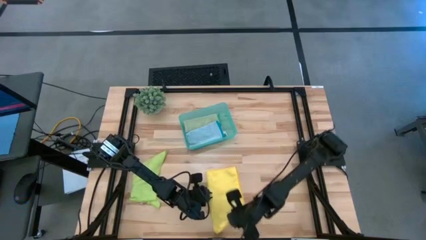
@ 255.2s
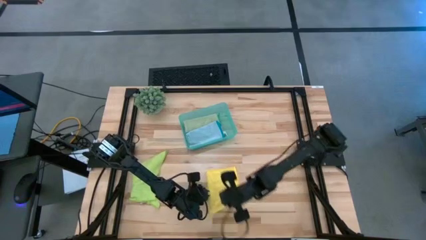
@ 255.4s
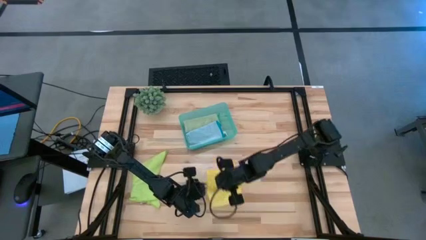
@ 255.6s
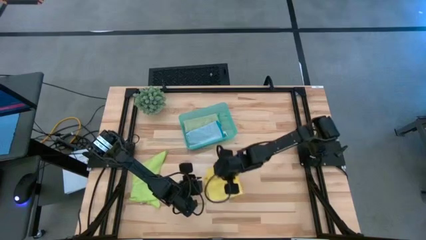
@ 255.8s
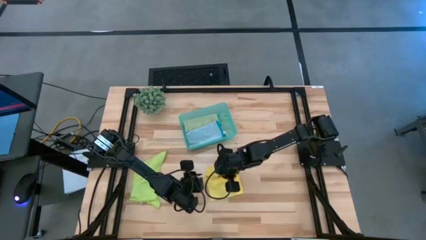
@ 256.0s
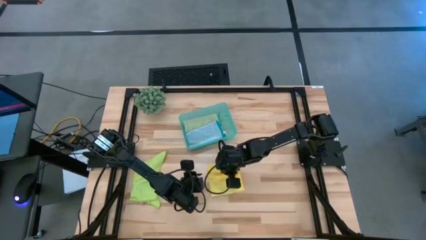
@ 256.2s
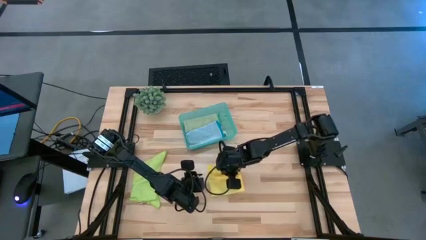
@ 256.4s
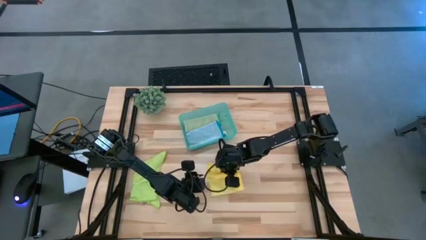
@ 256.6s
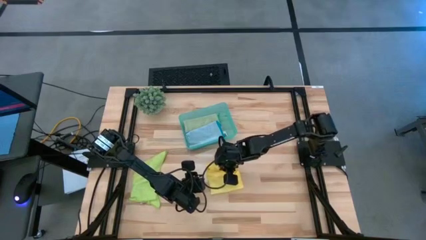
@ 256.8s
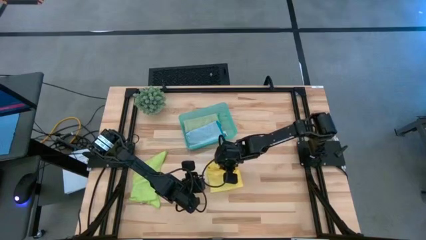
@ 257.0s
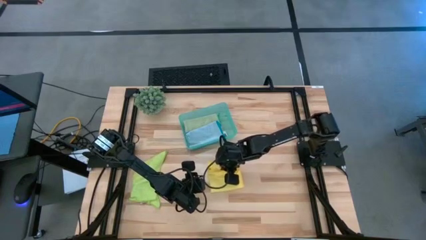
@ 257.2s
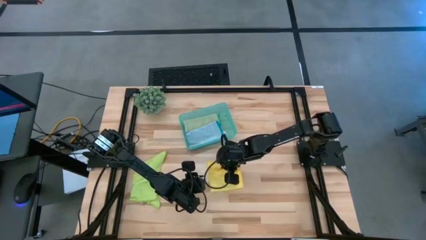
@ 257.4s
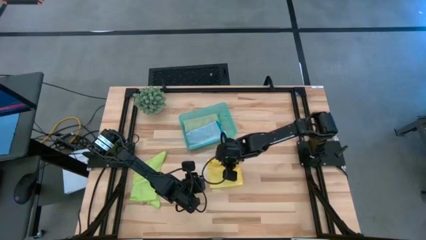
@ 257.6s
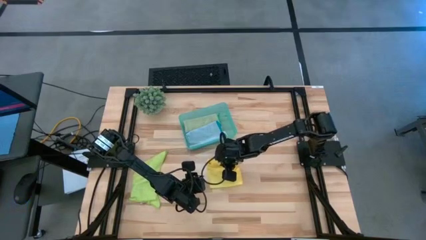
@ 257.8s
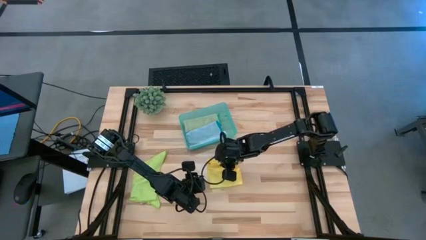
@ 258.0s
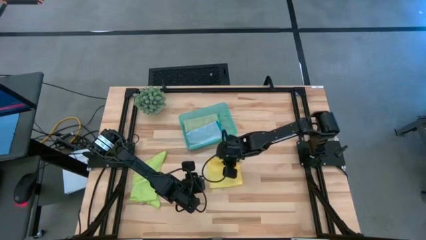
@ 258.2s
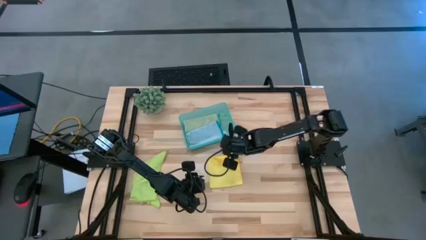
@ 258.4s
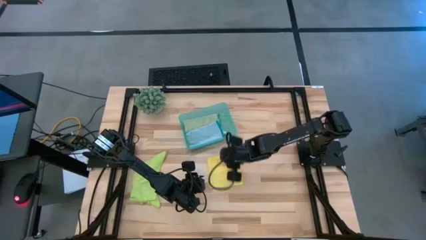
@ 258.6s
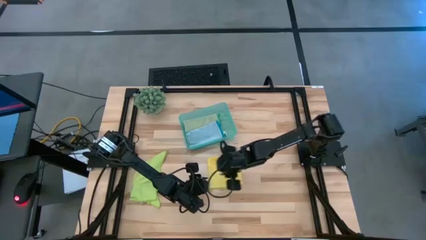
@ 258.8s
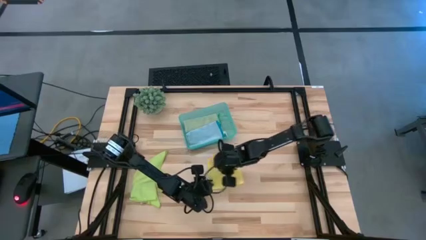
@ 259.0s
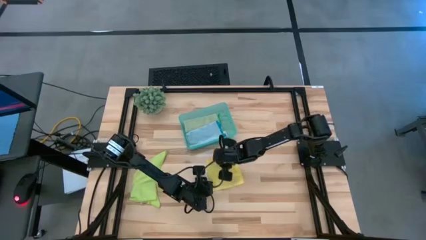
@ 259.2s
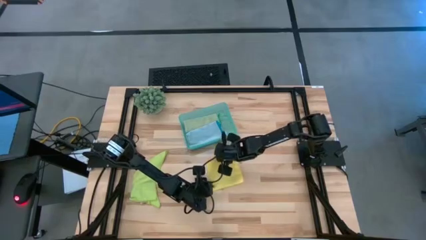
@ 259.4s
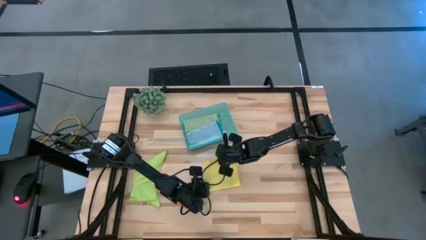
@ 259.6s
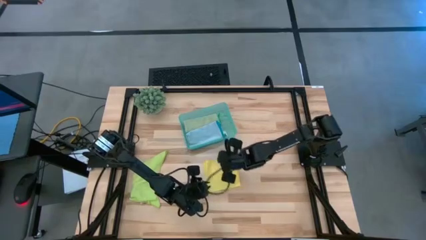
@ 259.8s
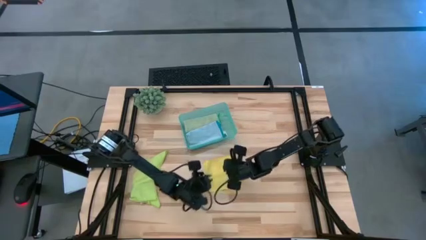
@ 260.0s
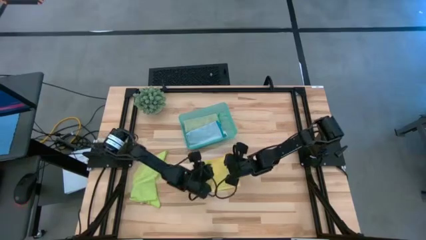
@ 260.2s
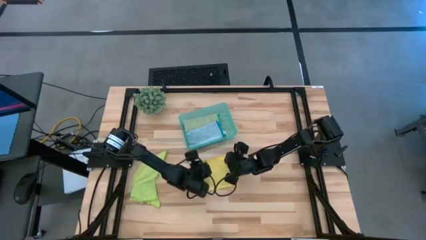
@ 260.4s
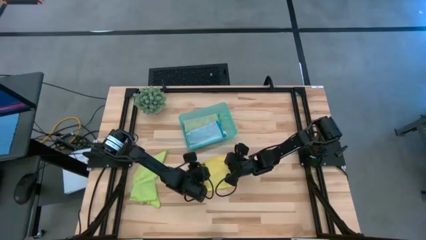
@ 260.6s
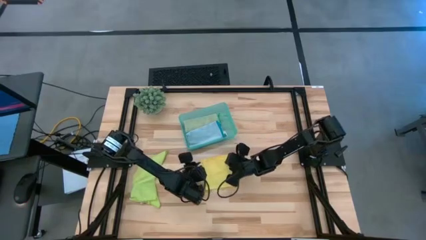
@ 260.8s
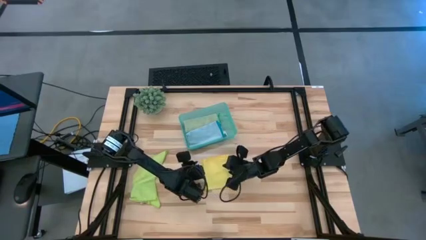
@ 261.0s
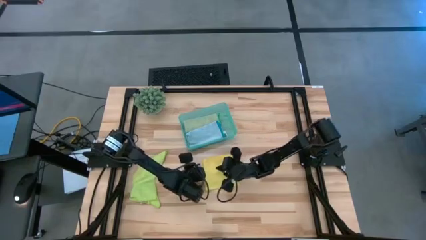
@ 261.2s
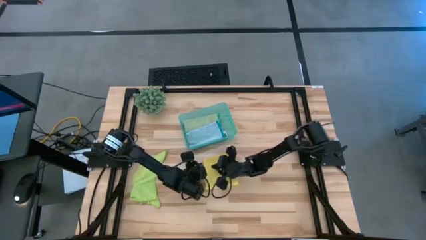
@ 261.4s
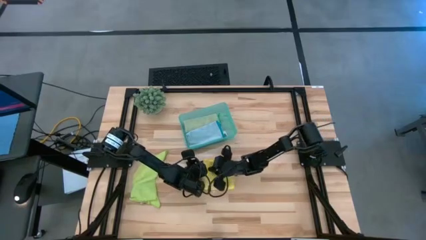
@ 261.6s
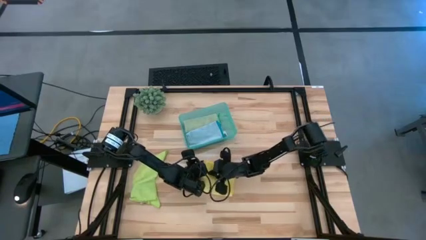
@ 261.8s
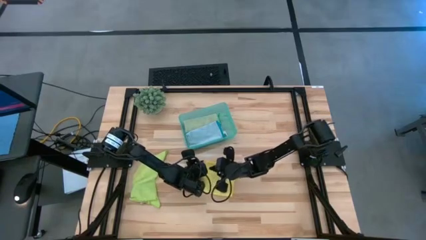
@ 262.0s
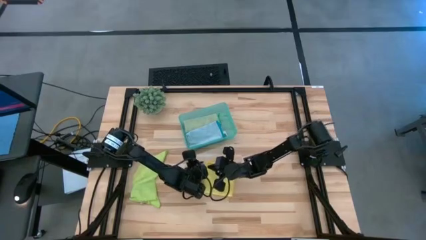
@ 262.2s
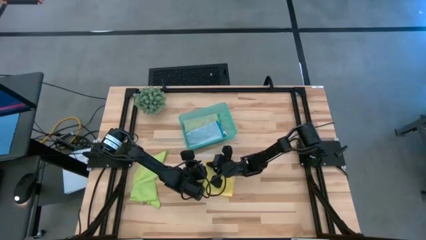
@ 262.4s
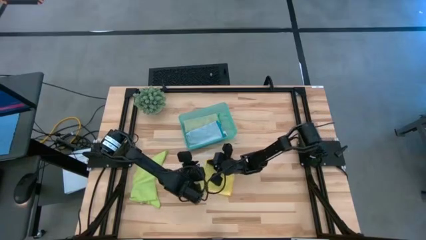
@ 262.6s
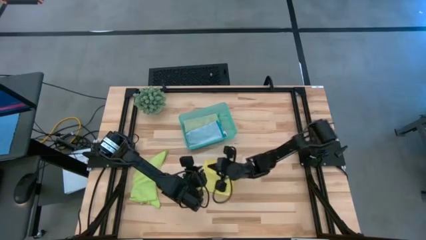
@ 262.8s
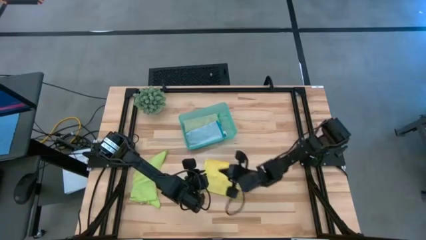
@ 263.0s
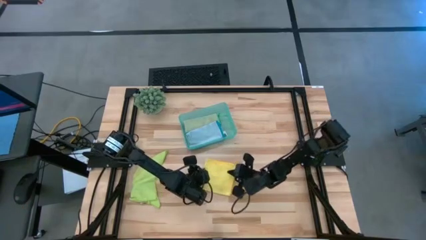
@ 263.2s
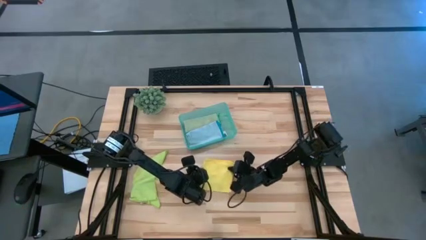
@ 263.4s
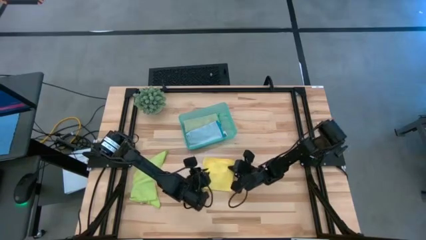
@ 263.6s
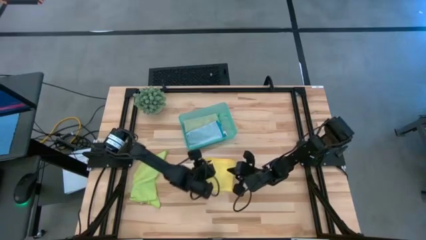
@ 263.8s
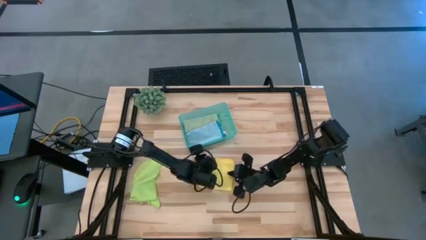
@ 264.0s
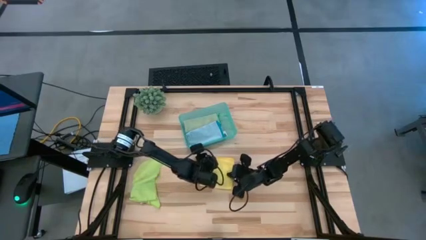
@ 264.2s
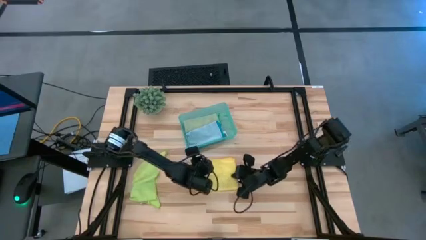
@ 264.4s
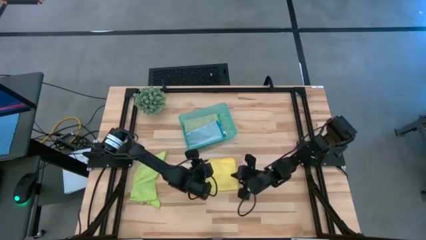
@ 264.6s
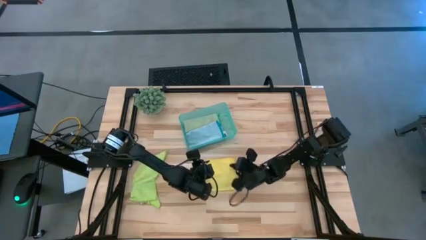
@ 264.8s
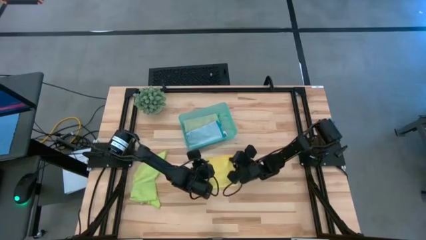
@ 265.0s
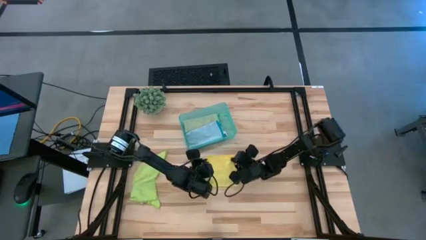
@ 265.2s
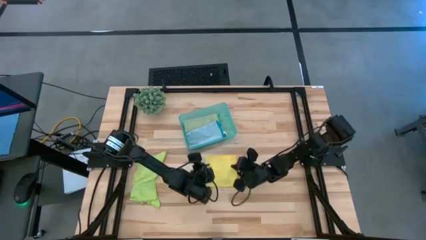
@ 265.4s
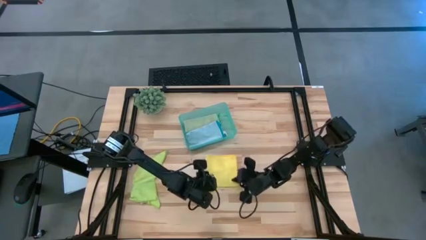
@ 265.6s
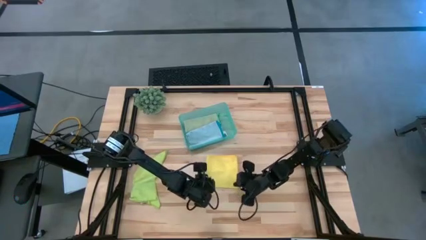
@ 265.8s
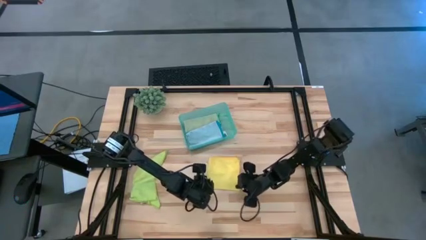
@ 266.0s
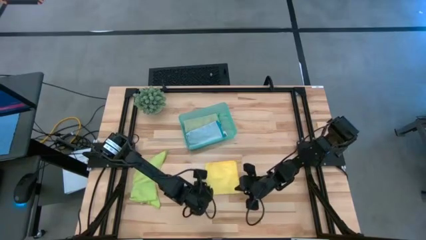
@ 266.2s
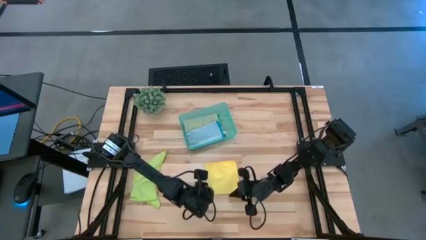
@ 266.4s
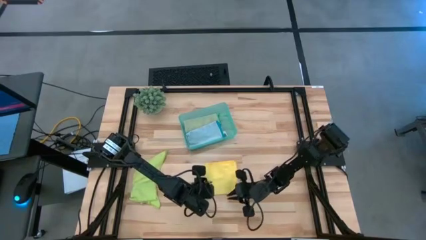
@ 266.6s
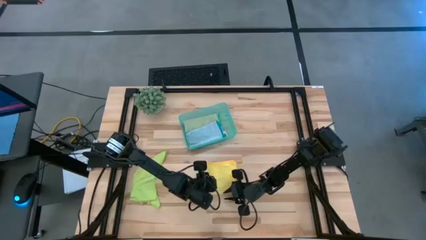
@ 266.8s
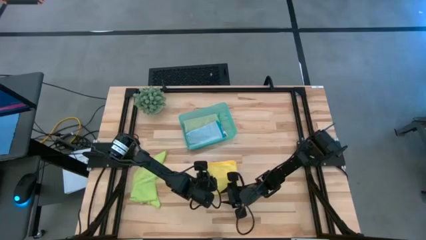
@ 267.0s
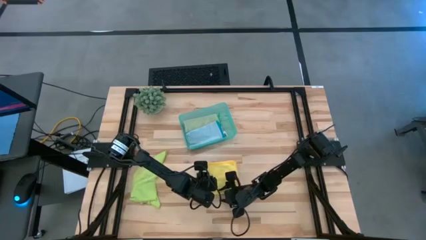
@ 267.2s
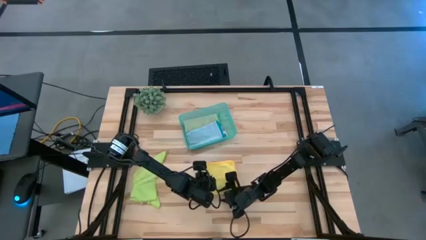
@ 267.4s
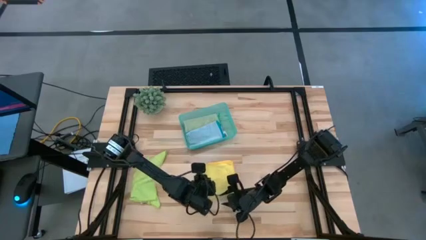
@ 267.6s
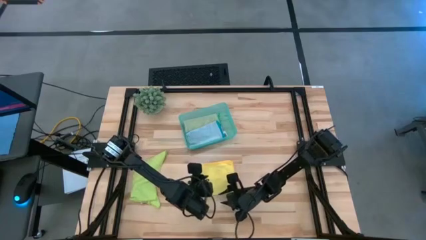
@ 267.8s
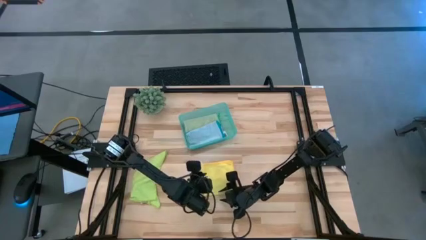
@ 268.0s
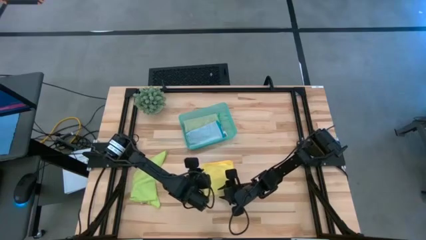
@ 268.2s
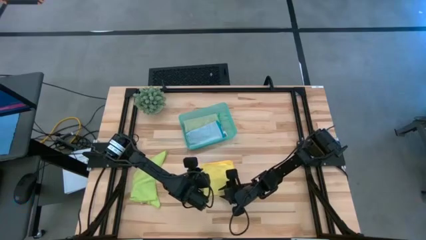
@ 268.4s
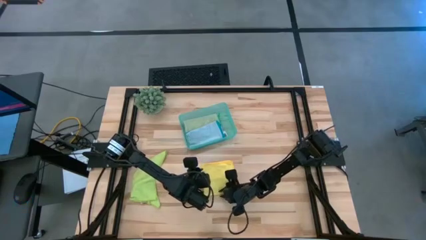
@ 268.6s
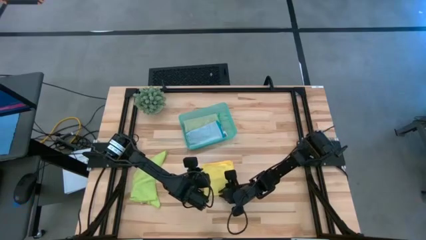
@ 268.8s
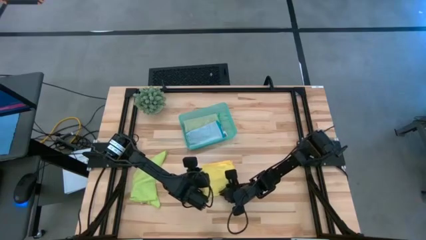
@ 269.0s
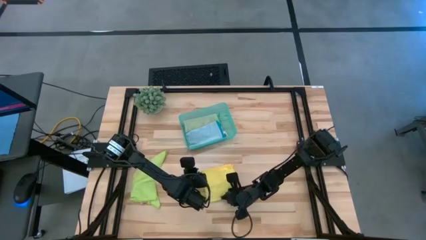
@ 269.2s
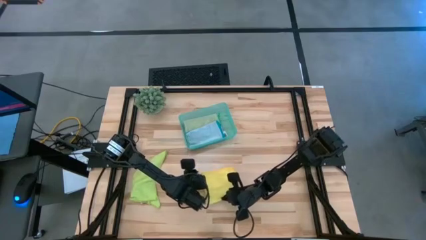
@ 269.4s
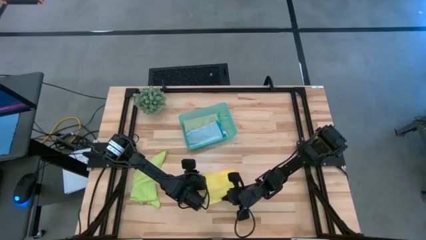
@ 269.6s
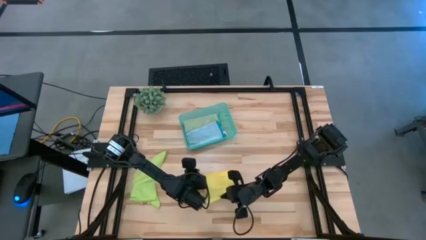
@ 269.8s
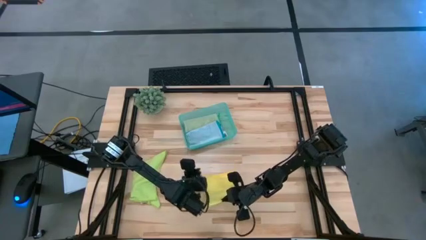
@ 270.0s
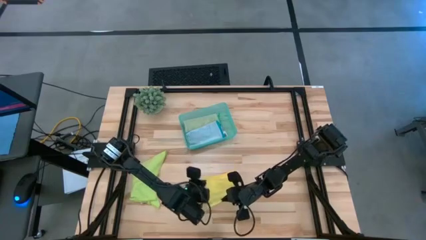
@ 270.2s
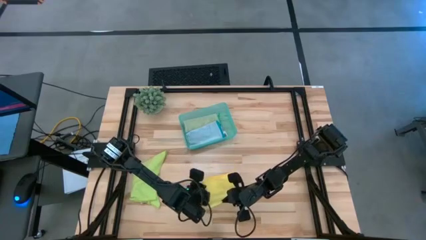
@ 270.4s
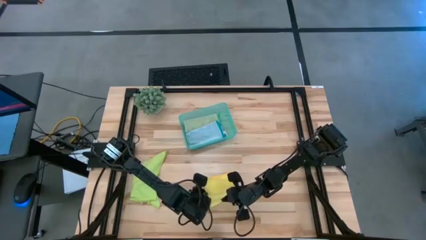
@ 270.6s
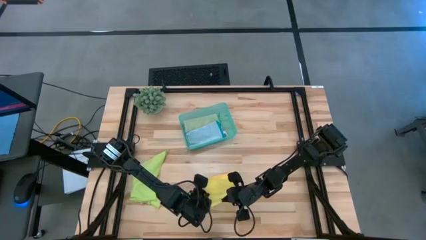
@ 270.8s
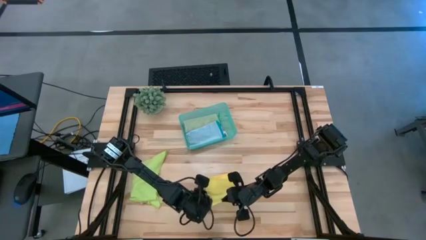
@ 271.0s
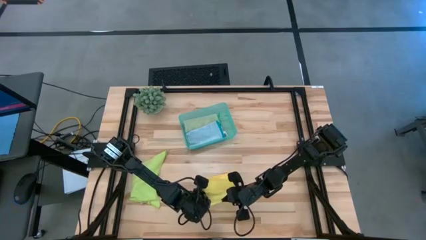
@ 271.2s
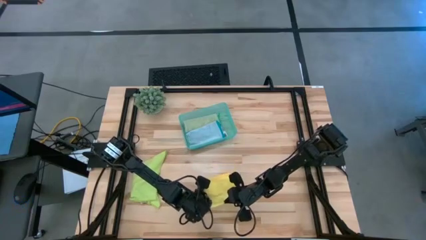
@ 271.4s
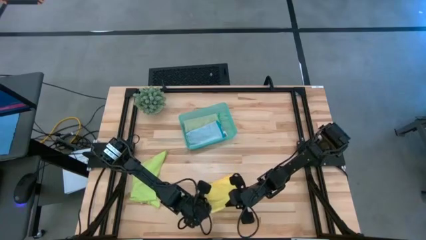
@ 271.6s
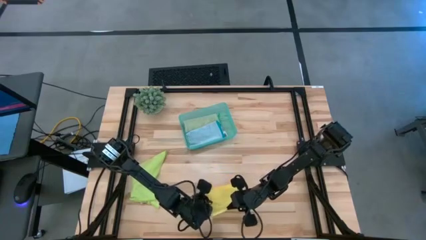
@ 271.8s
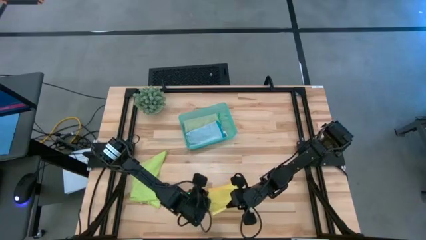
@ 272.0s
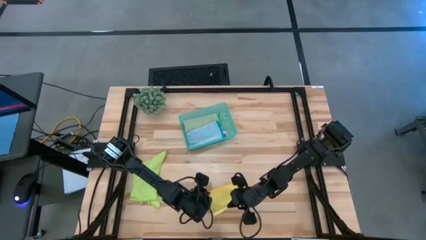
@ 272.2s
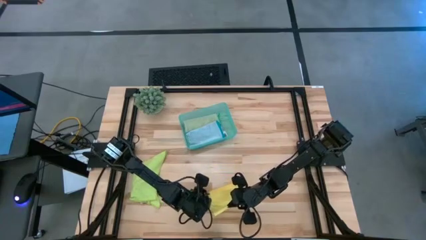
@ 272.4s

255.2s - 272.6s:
Task: Fold microfiber towels
Fold the yellow towel
